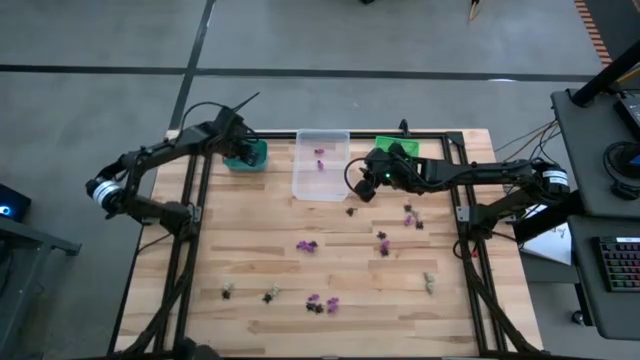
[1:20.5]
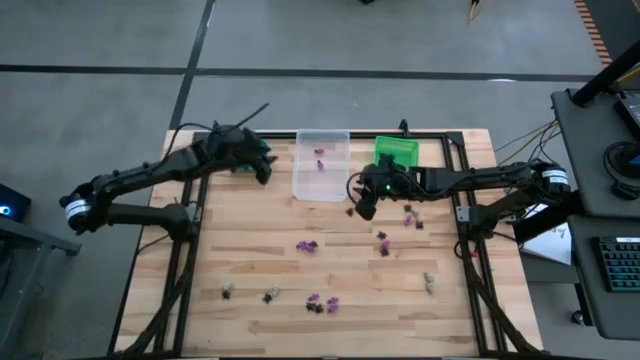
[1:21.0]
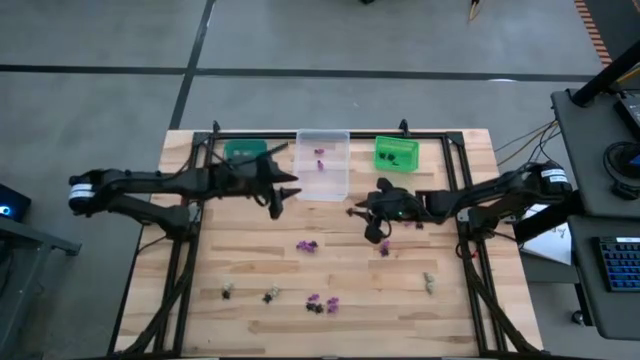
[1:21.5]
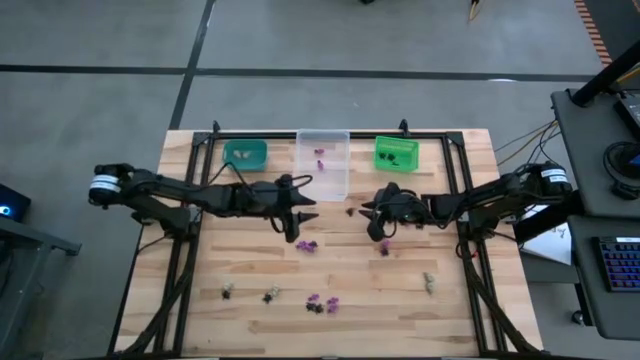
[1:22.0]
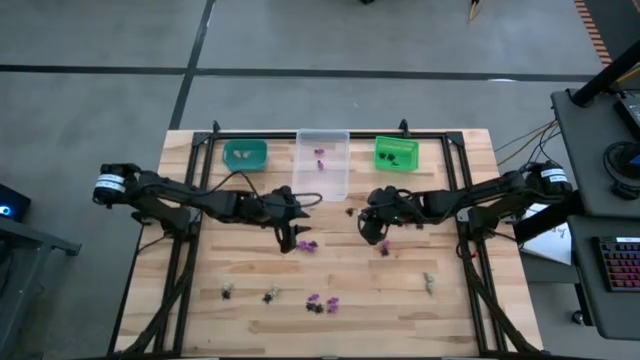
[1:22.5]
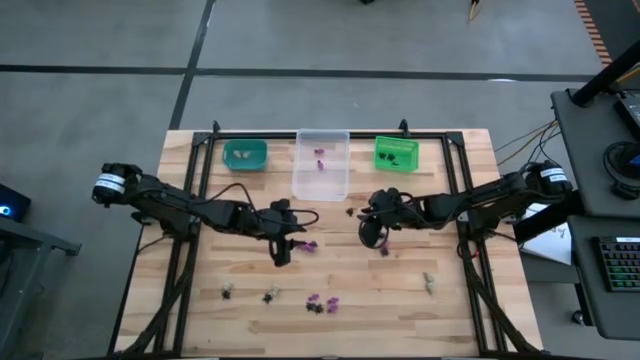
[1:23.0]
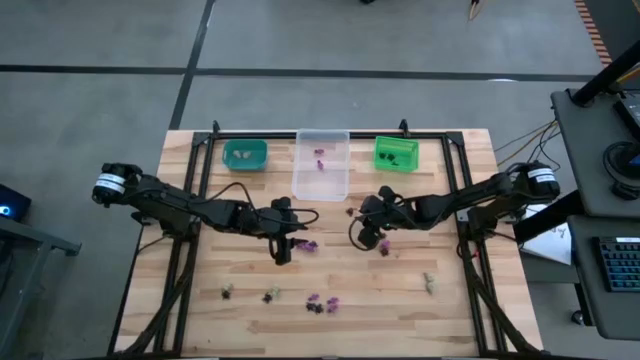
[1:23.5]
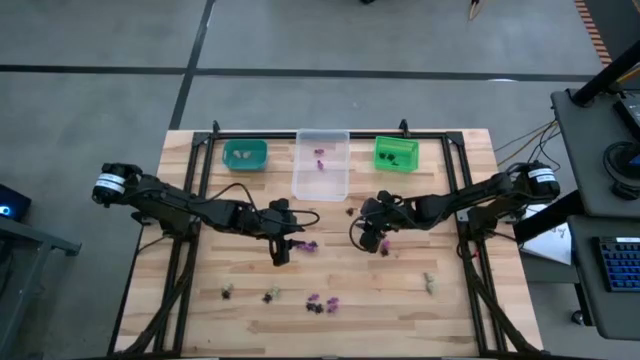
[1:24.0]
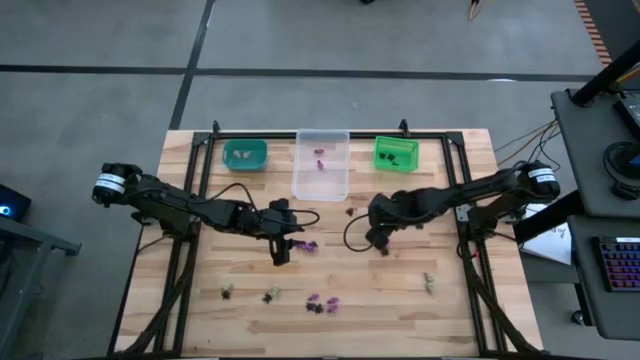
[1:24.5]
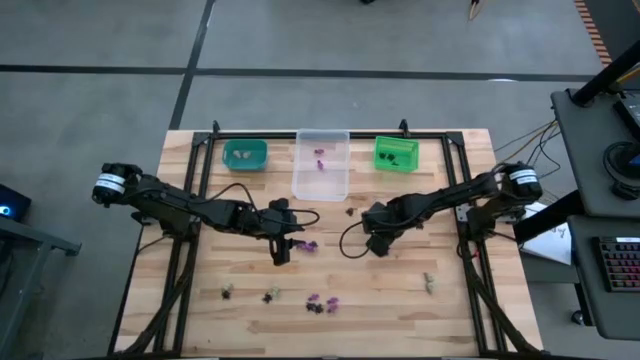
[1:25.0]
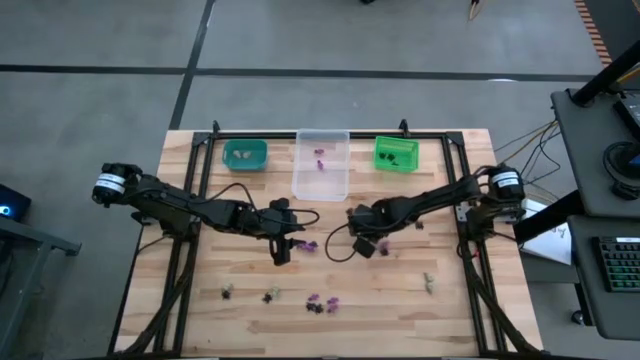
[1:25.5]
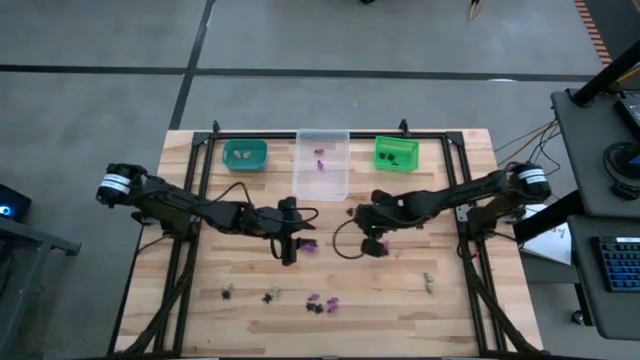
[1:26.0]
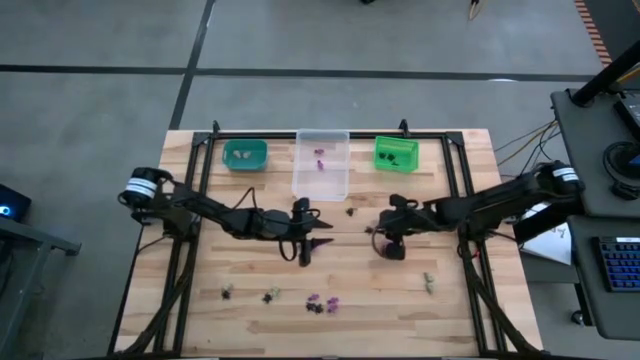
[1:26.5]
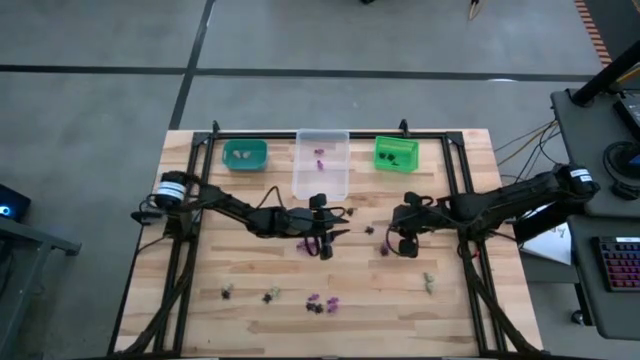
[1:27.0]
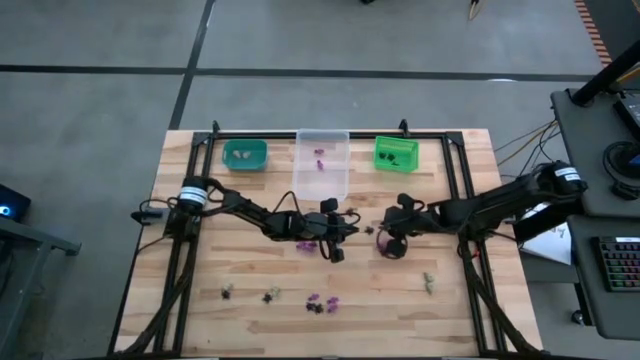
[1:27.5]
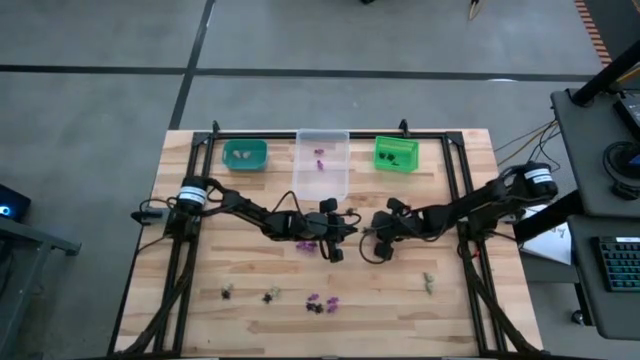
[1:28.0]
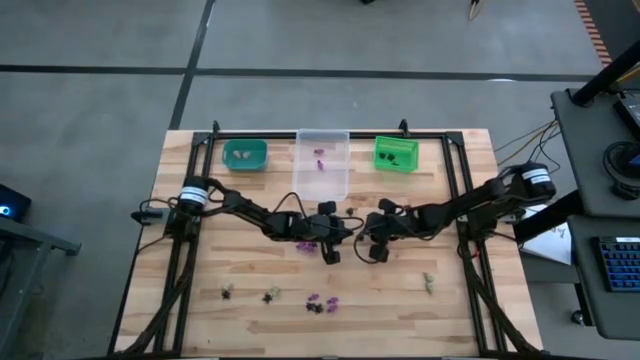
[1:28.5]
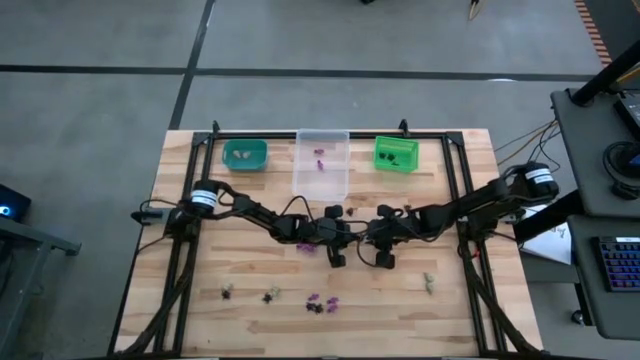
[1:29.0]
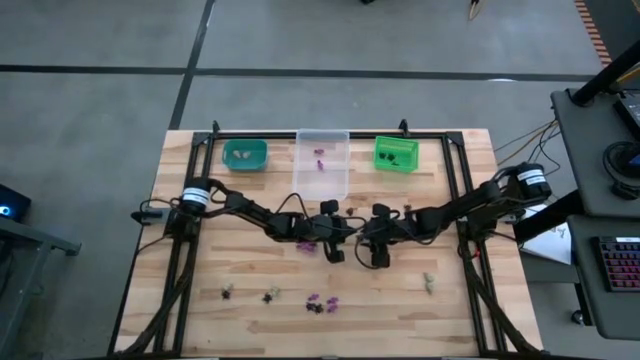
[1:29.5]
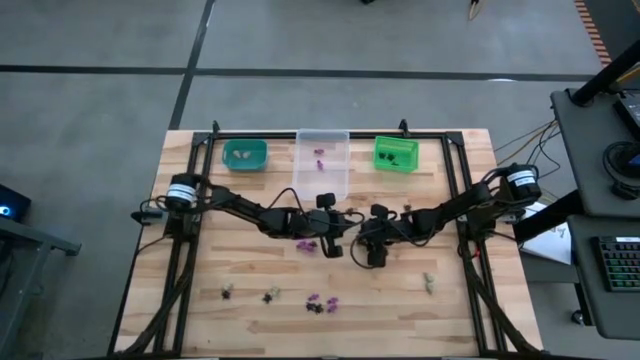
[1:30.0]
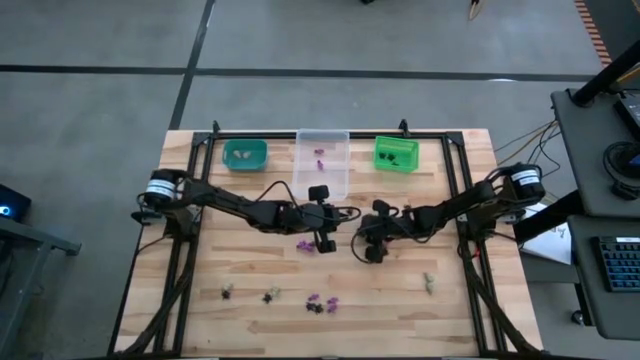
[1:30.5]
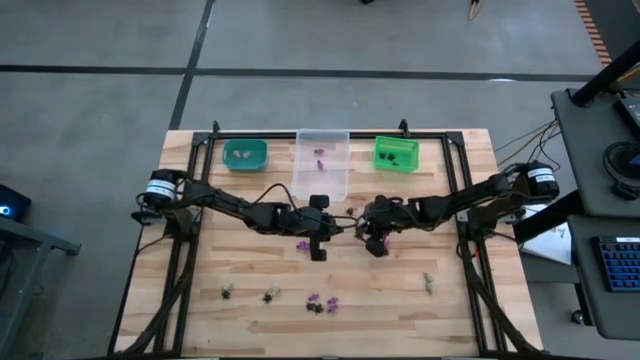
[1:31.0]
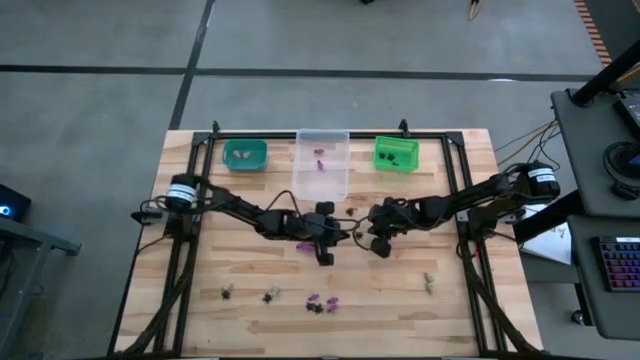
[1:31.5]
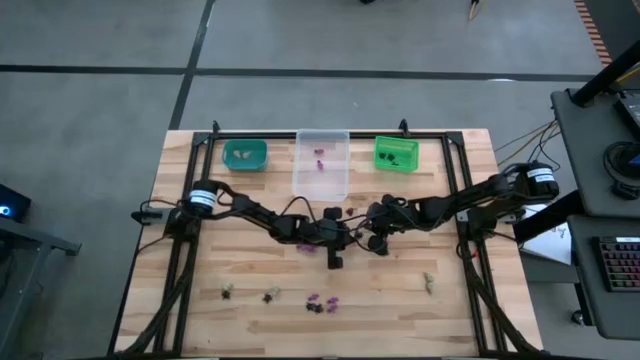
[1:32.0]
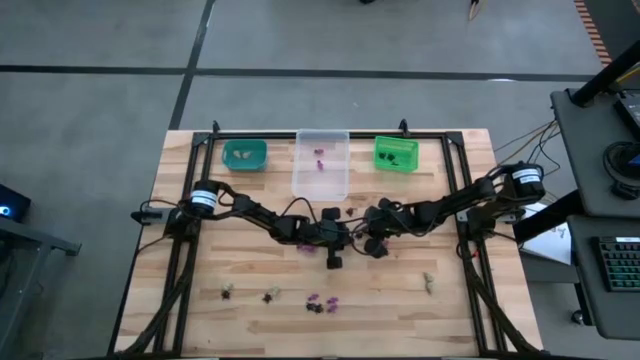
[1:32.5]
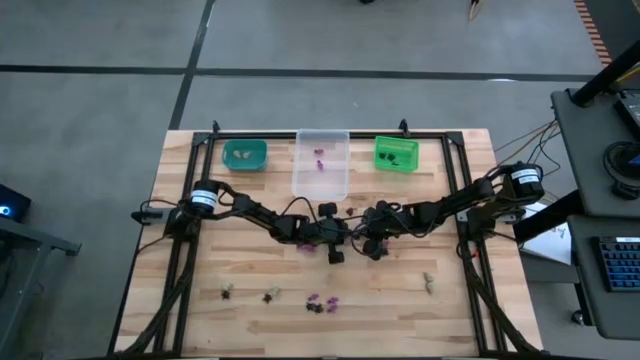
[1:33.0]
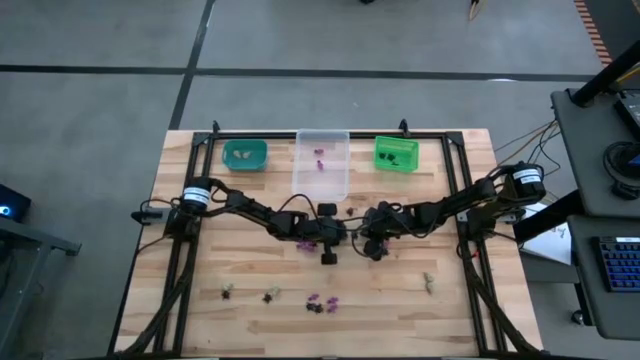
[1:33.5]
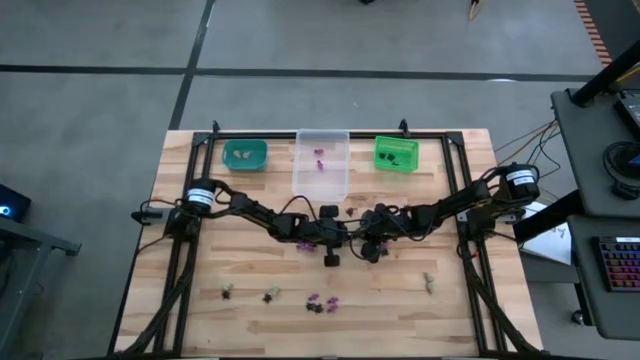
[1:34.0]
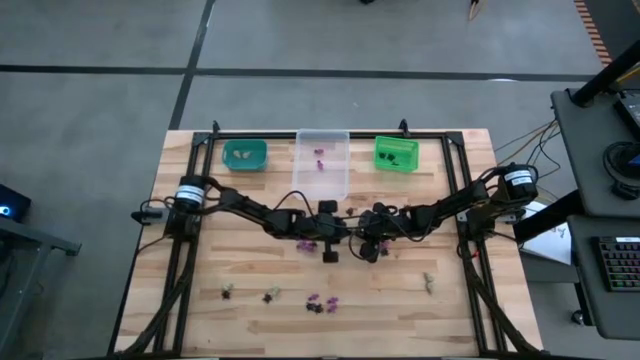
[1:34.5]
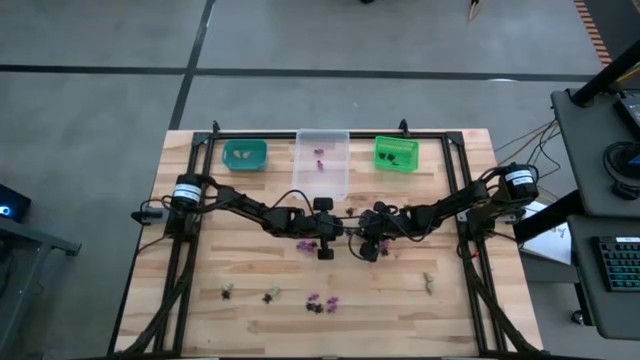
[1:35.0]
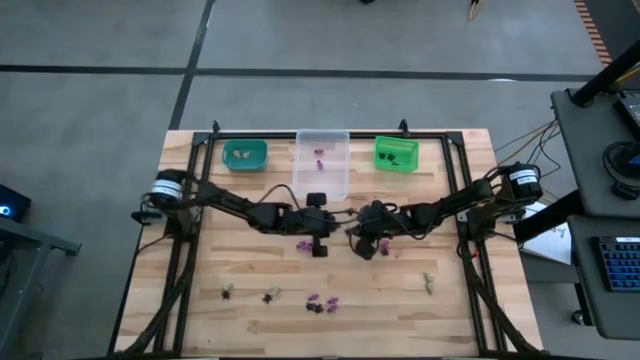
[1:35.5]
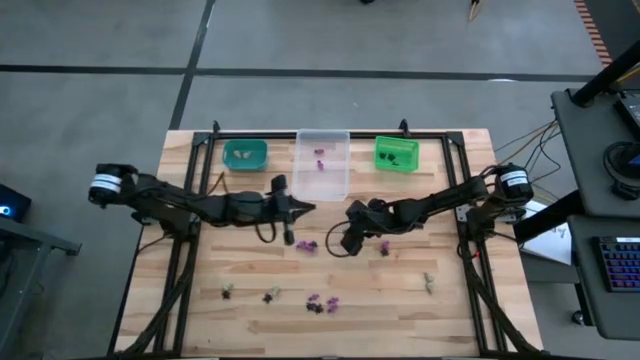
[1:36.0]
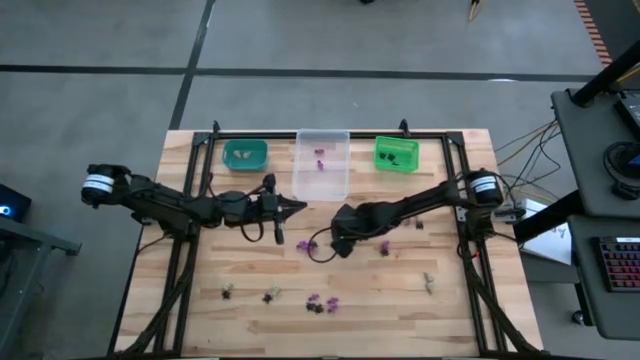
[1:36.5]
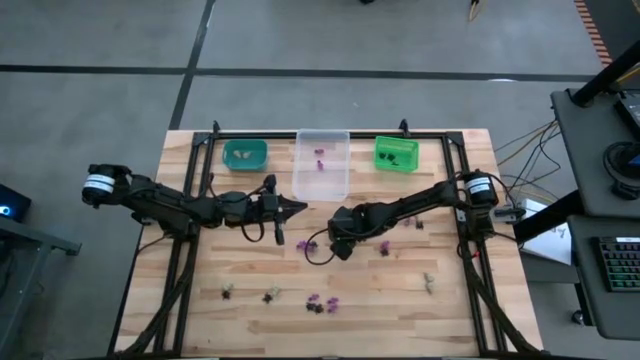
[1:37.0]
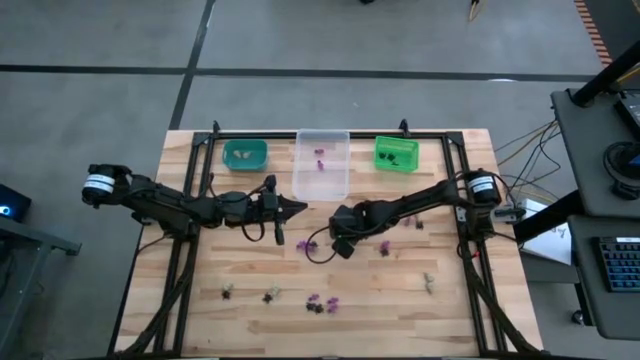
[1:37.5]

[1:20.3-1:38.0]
Task: Sort Halloween decoration
Put the black spider toy into the green bin

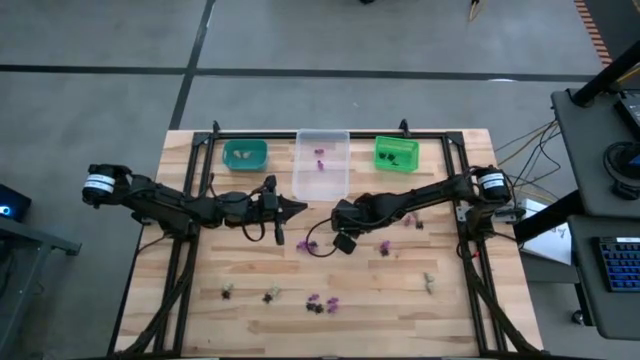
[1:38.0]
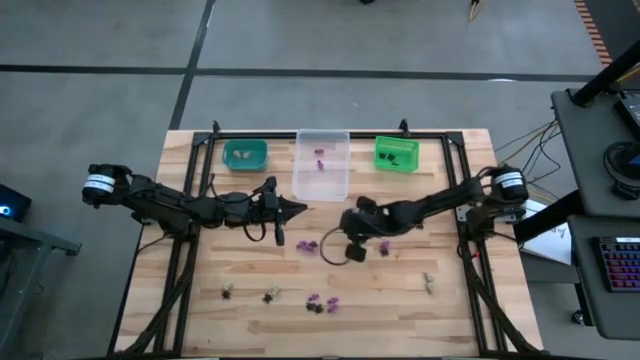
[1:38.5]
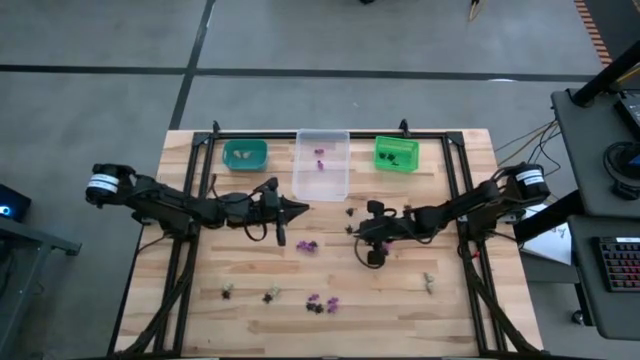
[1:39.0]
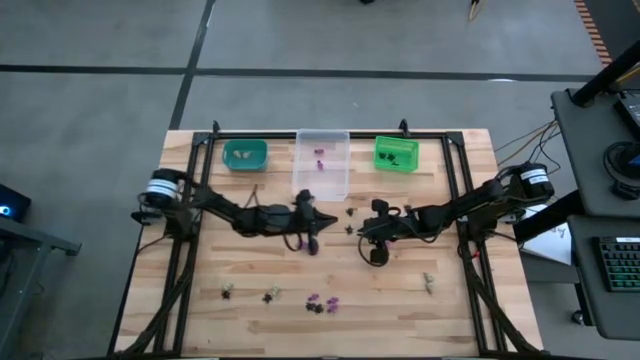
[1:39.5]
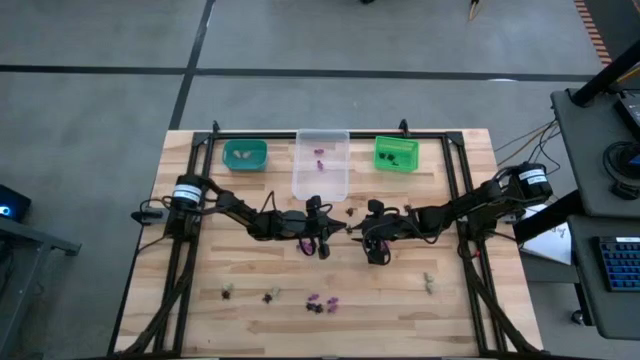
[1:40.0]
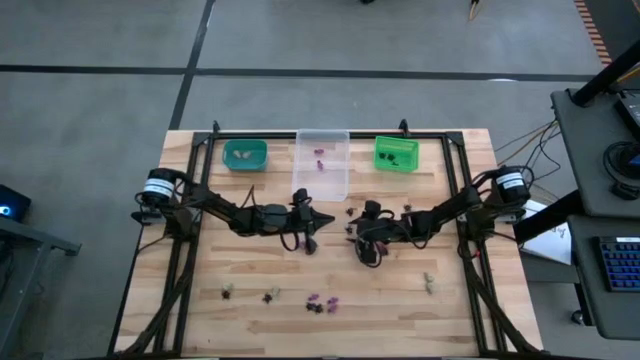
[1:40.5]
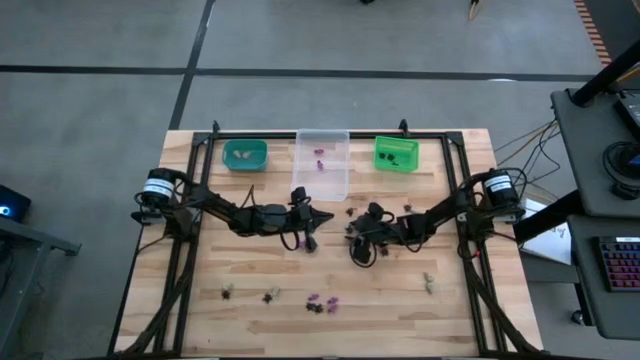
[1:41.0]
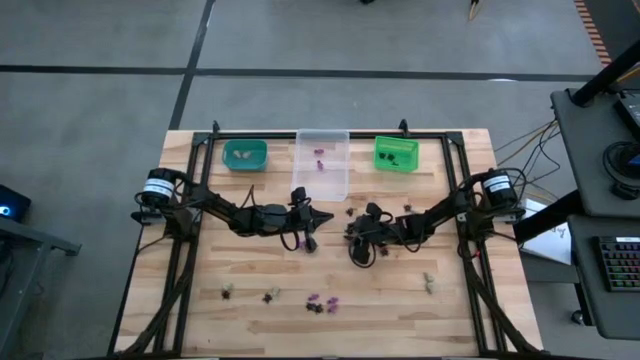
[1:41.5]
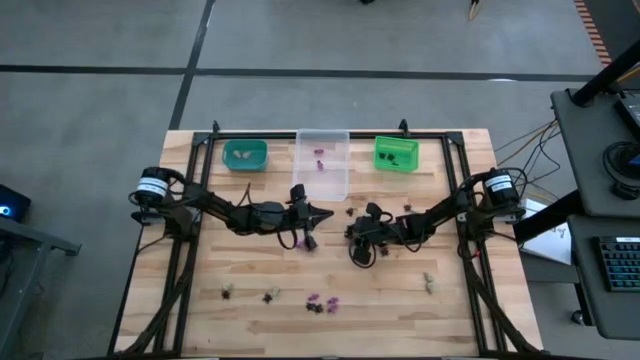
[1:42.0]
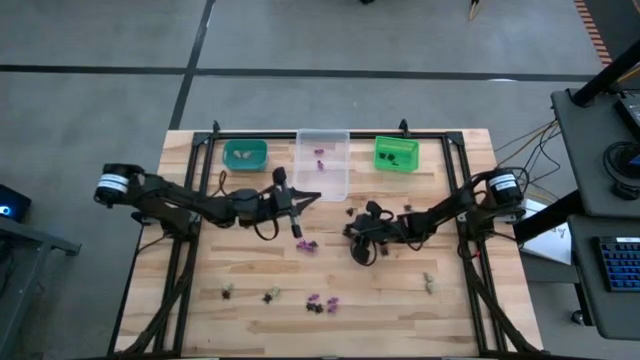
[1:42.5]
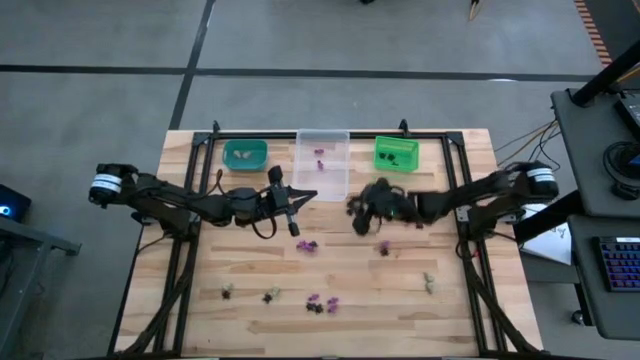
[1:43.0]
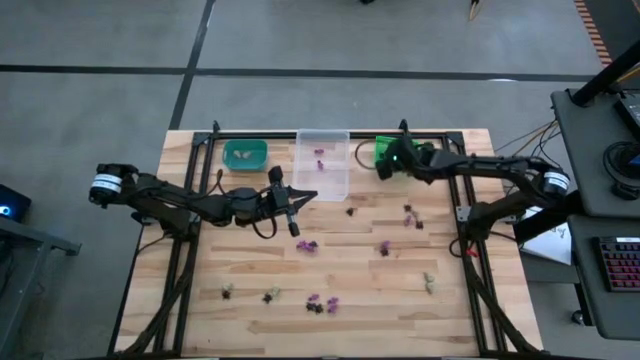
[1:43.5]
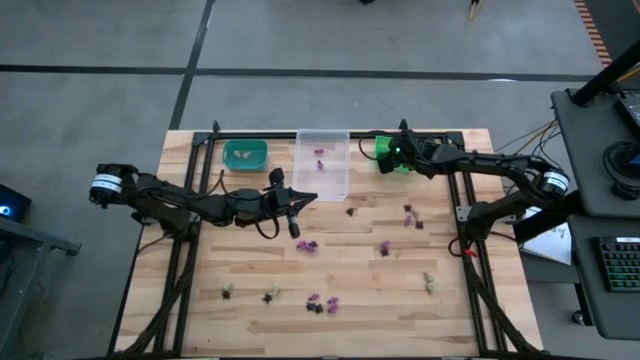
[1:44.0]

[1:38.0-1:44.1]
Put the black spider toy into the green bin
